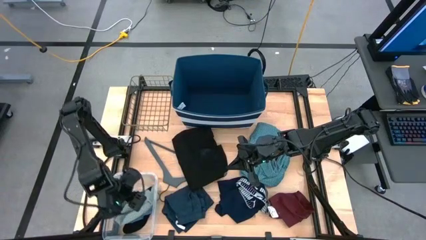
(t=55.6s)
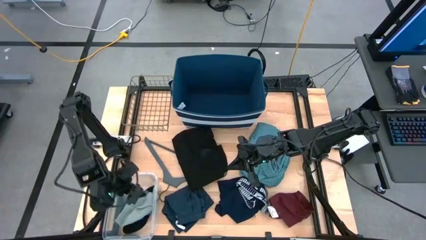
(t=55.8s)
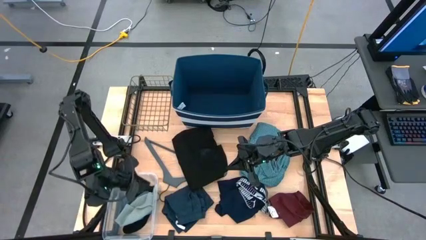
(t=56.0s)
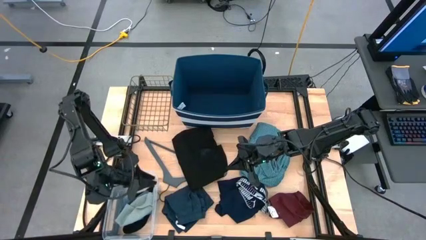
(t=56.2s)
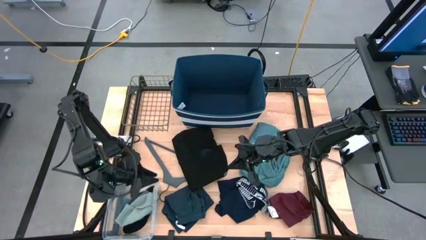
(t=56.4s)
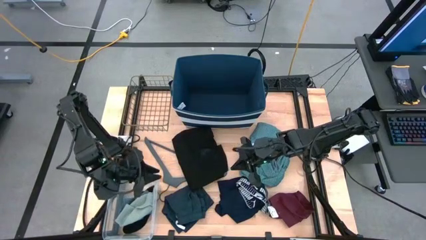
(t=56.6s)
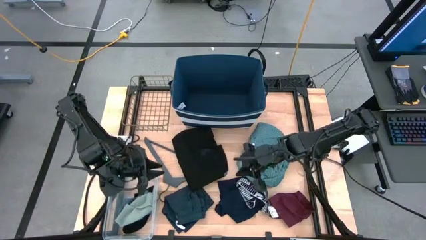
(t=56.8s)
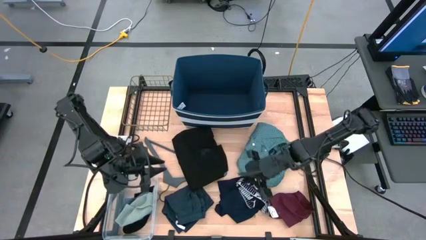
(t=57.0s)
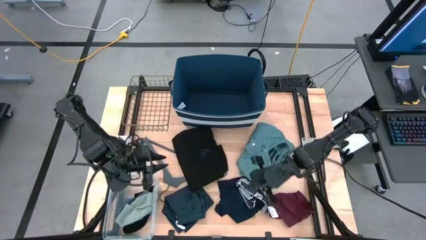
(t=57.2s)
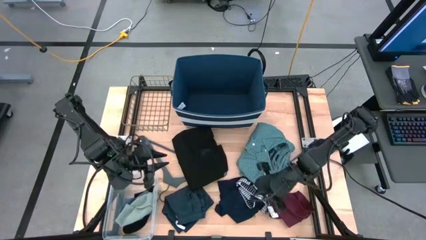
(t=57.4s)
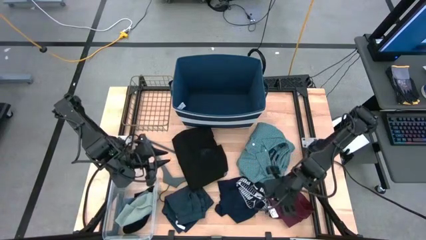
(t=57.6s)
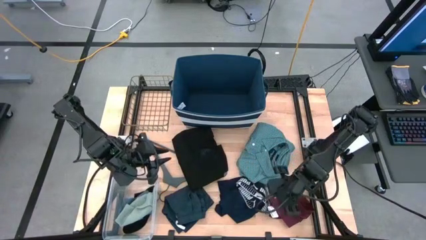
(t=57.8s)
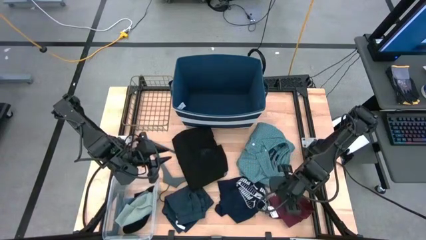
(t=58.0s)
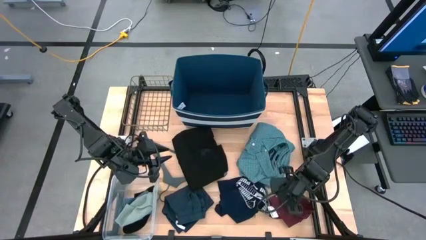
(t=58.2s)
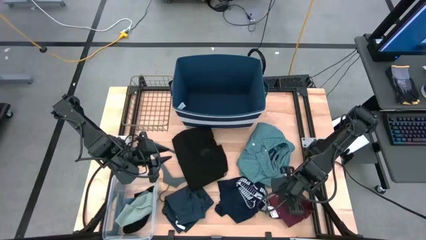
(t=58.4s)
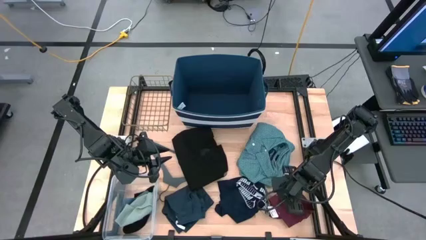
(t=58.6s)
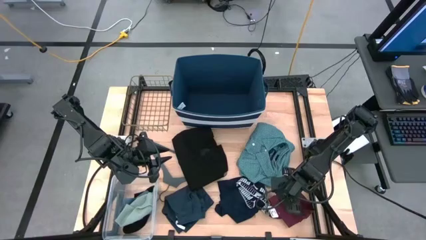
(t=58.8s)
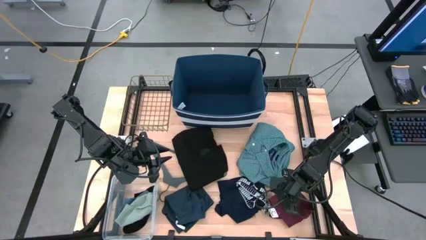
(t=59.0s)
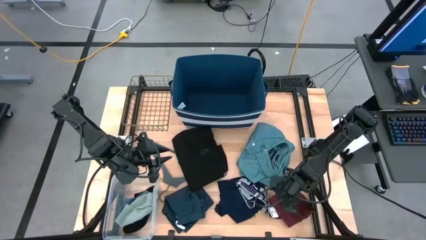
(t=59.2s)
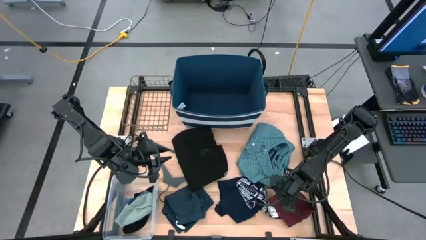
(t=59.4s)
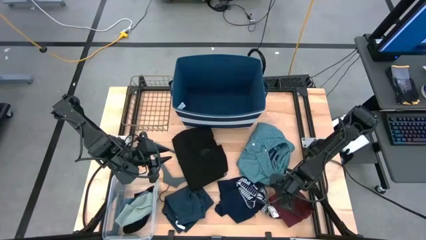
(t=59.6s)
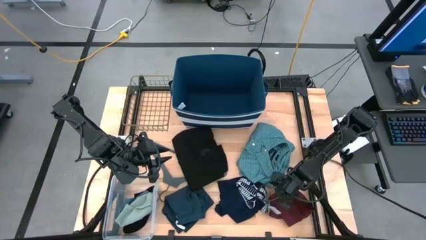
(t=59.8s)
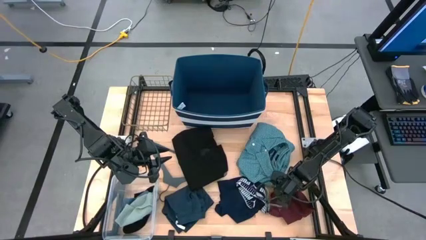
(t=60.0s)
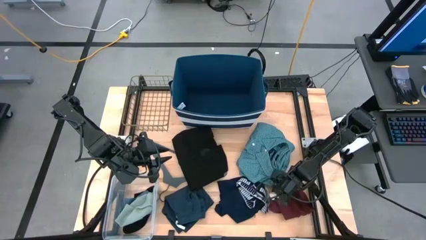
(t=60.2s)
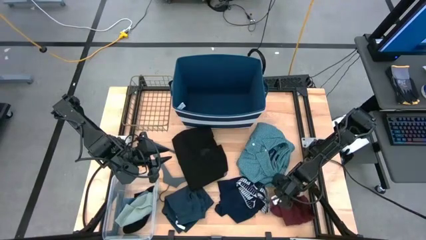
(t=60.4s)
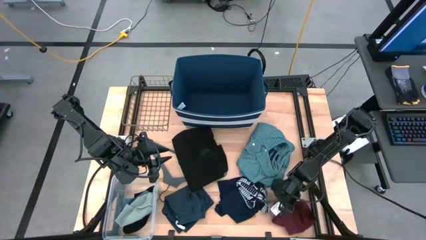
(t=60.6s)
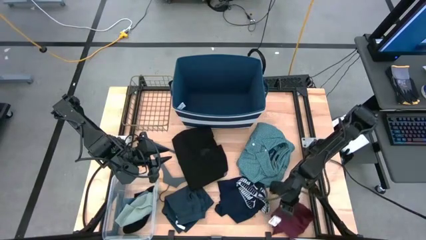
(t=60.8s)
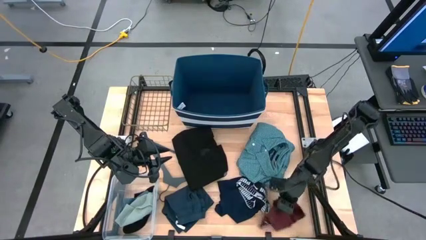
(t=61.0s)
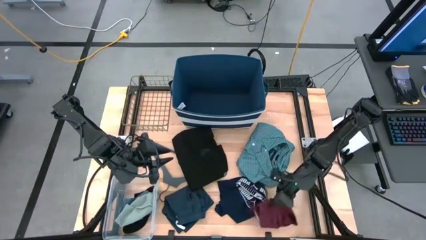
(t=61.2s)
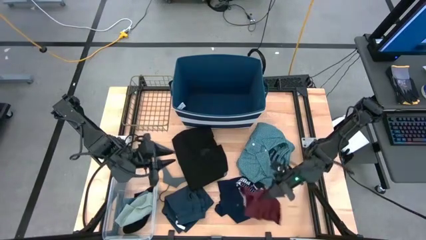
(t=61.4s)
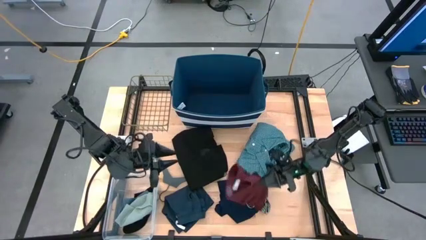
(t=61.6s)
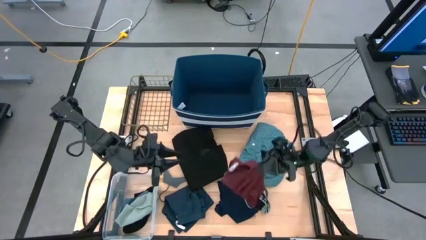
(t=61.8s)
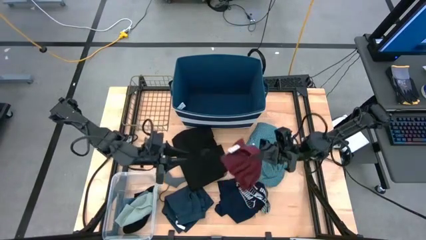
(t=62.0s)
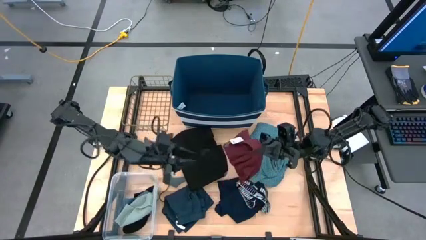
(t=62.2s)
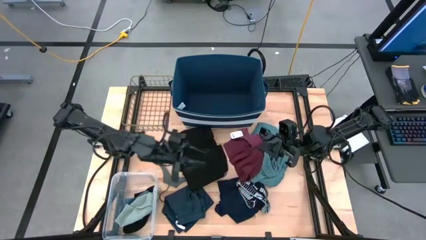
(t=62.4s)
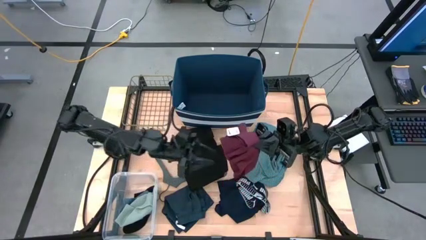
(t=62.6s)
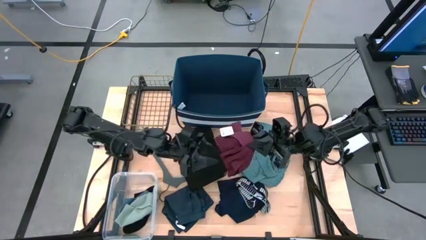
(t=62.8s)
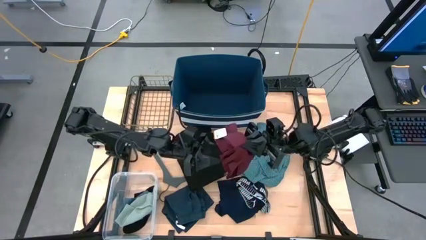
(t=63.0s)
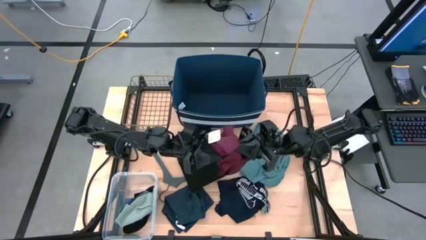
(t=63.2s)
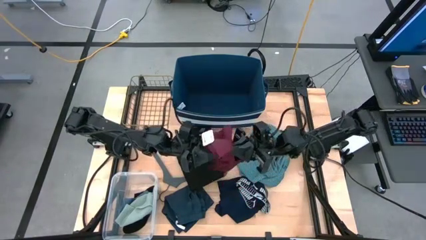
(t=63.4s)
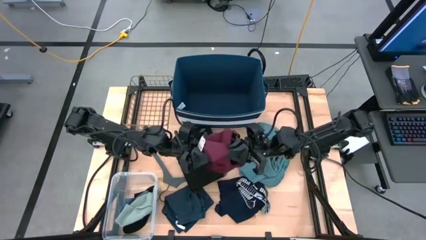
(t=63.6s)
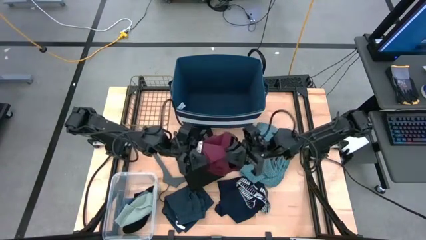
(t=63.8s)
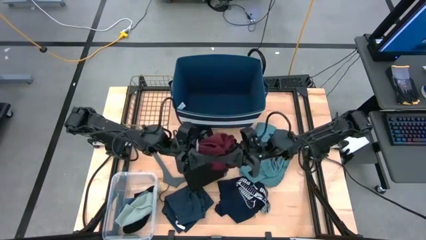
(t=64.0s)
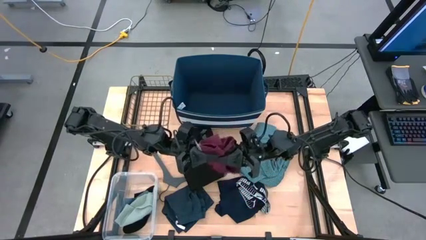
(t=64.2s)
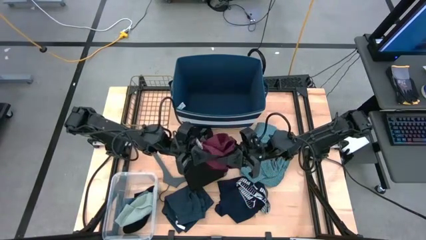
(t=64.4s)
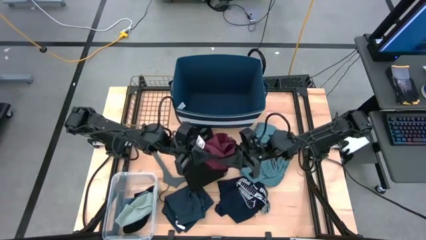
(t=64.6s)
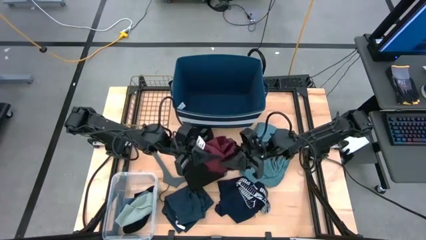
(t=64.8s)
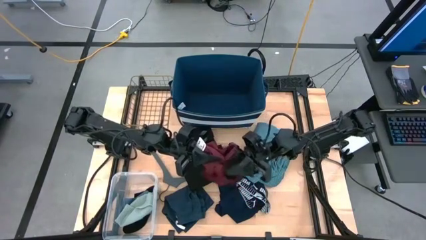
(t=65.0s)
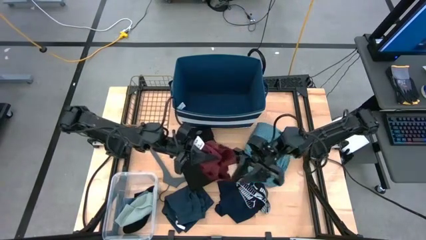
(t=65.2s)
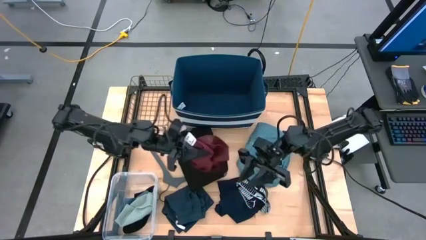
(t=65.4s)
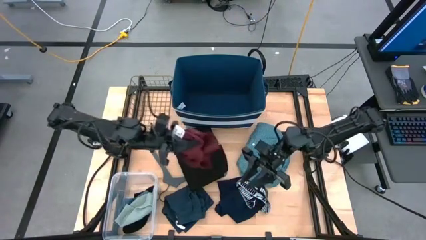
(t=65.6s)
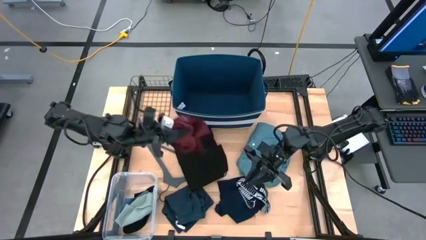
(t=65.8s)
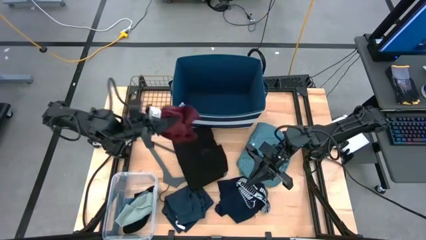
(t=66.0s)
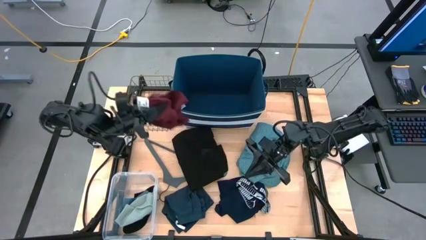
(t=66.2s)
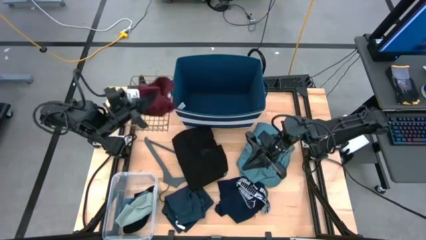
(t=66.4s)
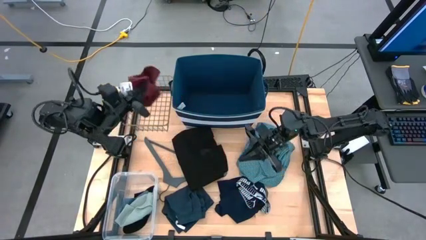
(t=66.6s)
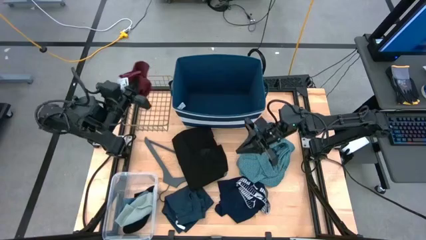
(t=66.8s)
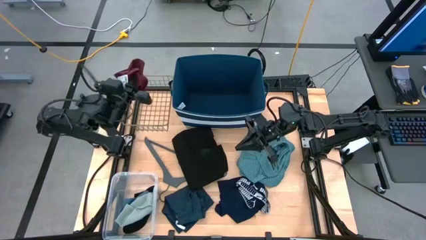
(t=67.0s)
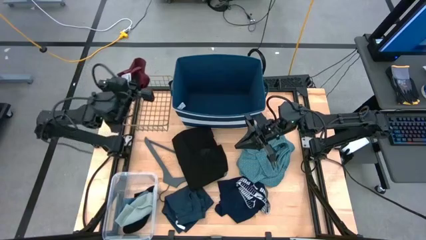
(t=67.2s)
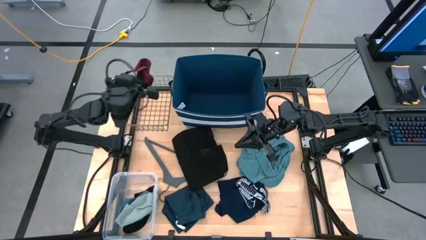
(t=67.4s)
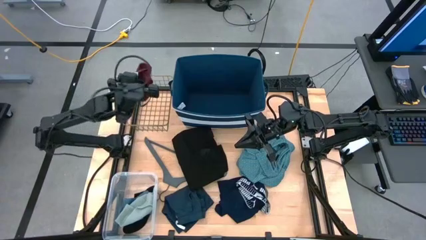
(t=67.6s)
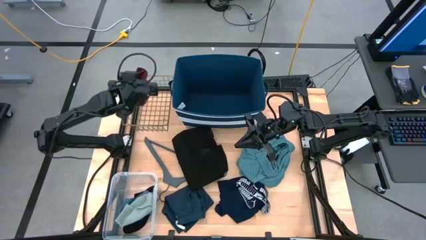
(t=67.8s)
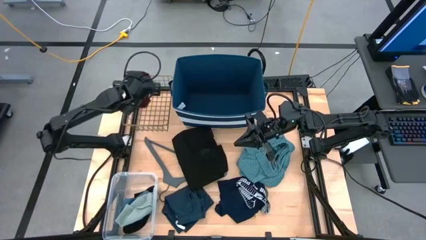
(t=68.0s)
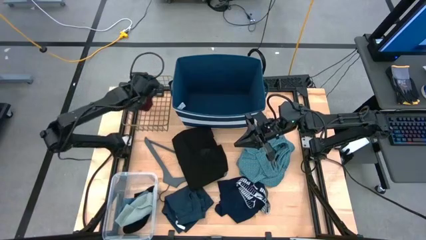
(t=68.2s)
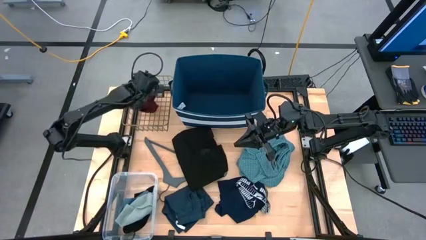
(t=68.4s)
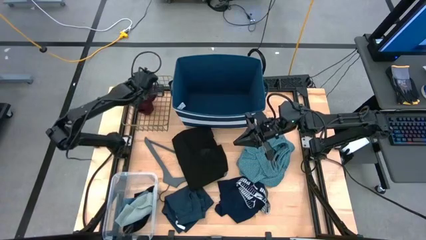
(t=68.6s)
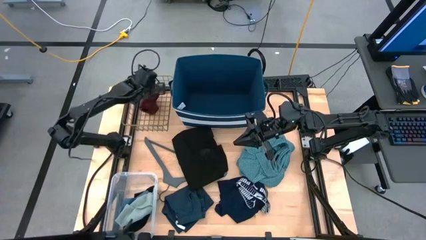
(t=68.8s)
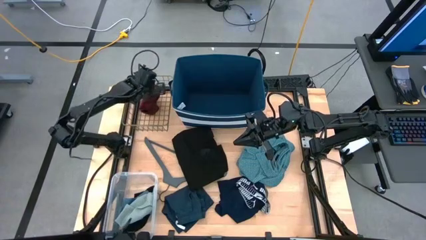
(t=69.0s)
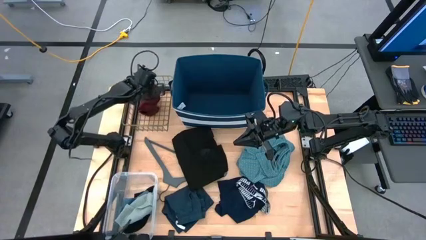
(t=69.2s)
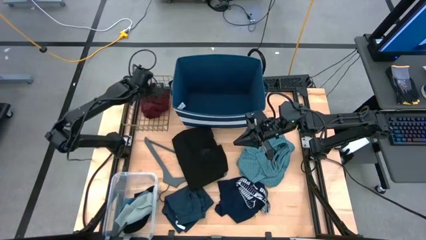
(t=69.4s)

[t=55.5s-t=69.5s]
Task: Pick & Place Cloths
Put the red underwear into the gold wire basket
